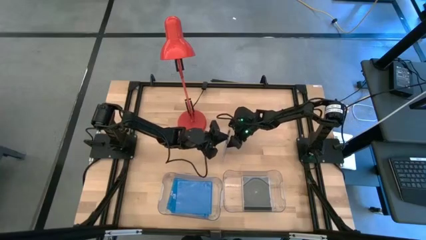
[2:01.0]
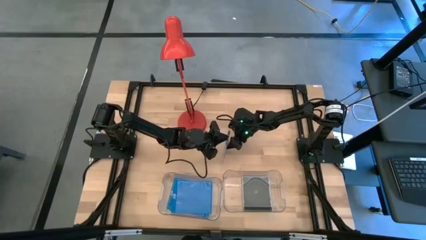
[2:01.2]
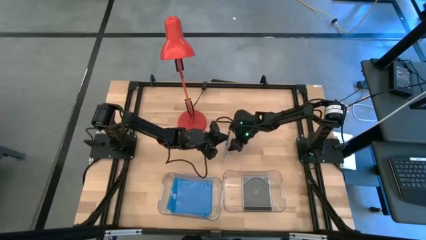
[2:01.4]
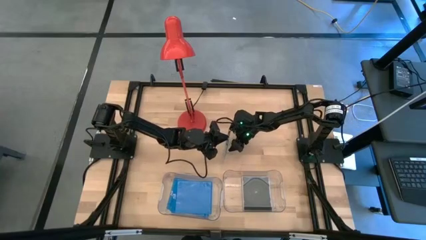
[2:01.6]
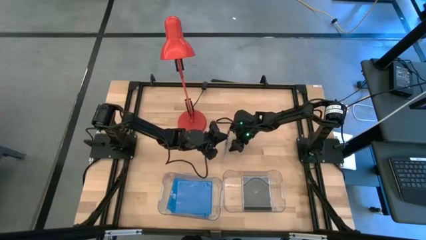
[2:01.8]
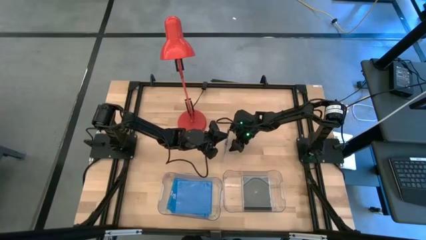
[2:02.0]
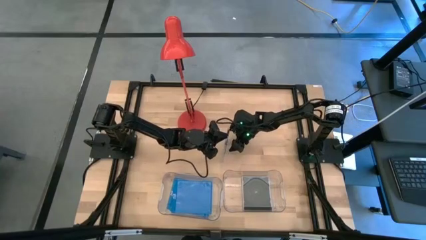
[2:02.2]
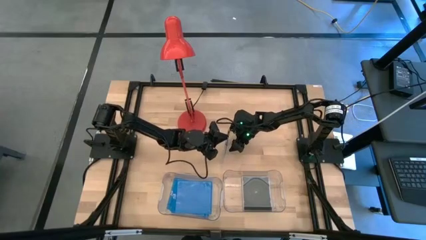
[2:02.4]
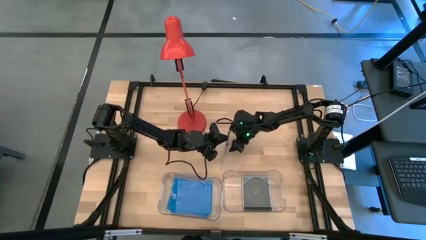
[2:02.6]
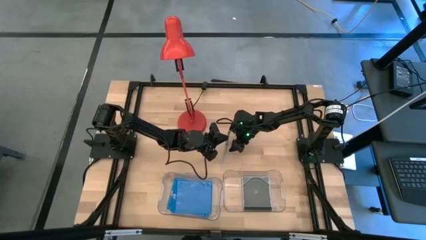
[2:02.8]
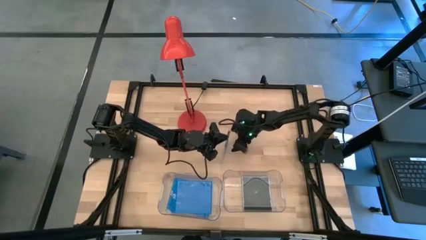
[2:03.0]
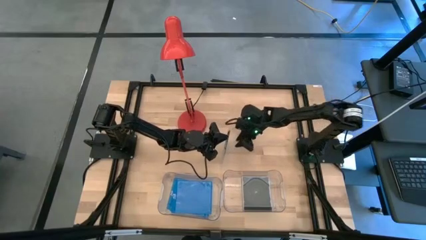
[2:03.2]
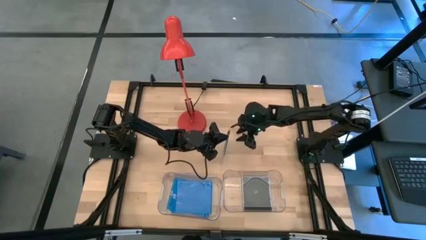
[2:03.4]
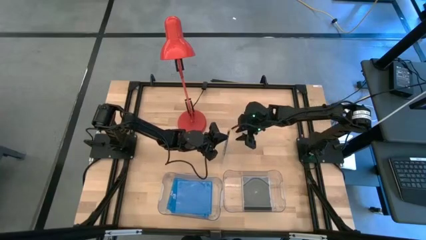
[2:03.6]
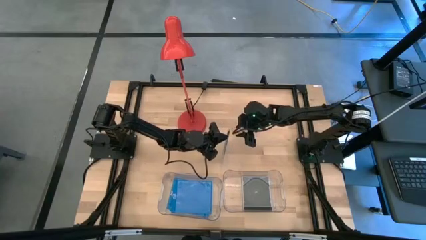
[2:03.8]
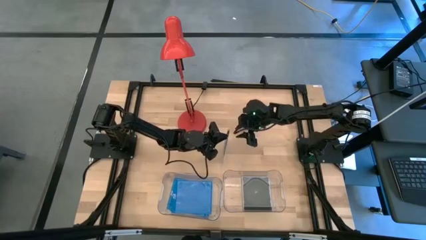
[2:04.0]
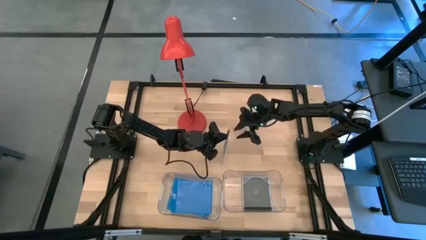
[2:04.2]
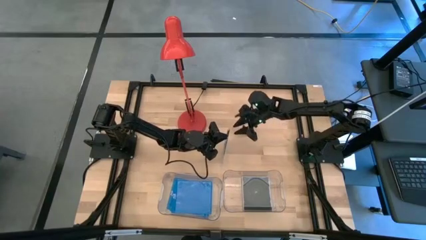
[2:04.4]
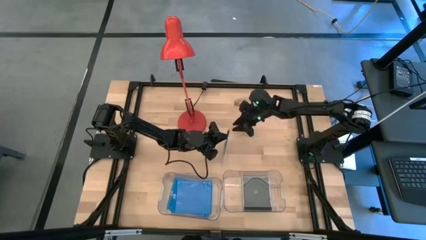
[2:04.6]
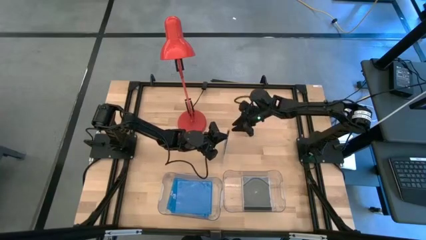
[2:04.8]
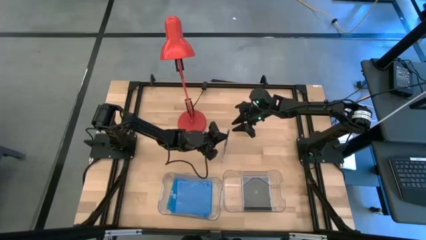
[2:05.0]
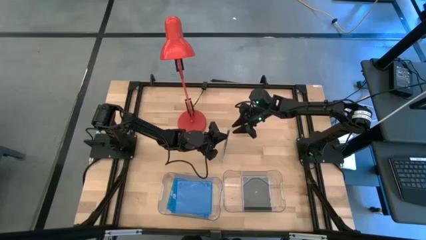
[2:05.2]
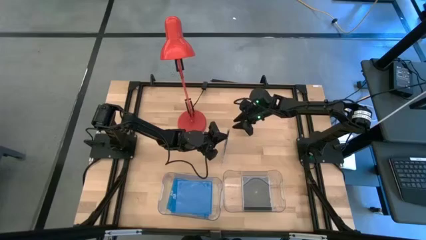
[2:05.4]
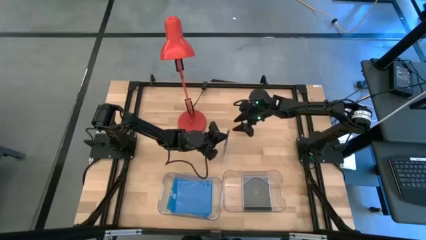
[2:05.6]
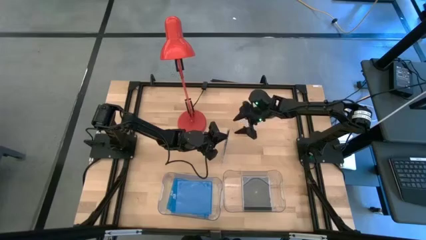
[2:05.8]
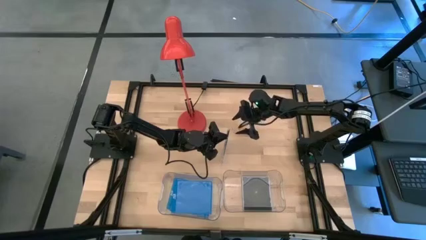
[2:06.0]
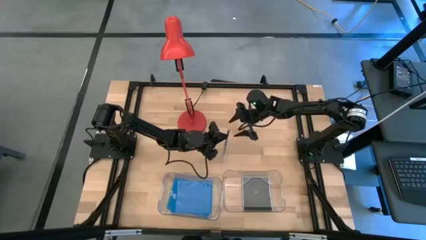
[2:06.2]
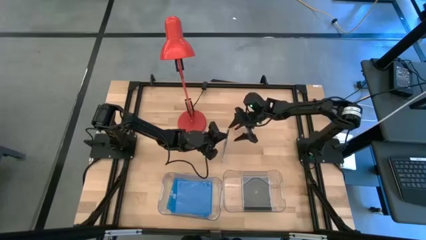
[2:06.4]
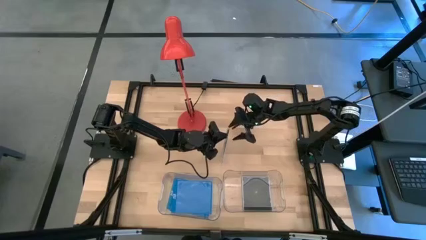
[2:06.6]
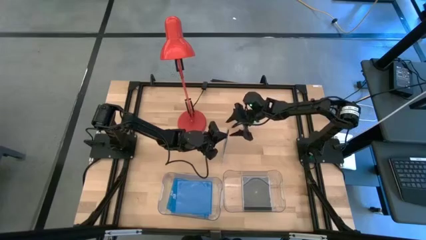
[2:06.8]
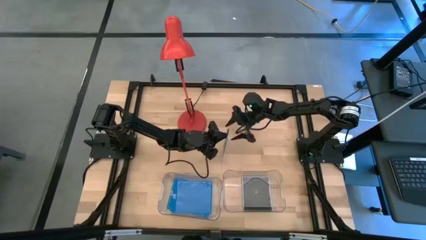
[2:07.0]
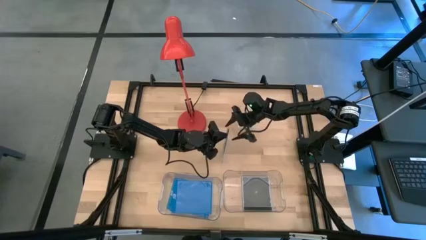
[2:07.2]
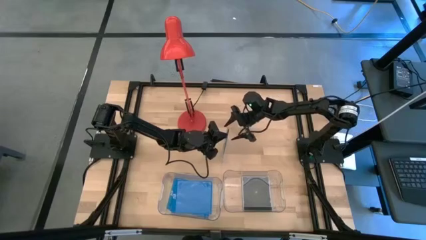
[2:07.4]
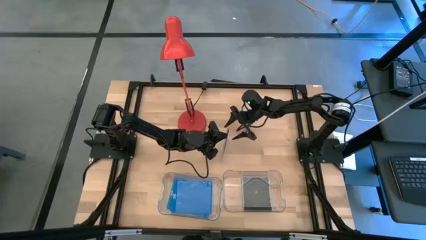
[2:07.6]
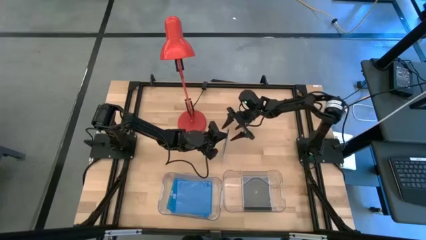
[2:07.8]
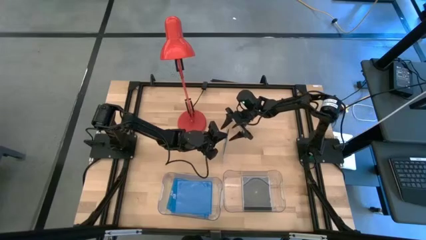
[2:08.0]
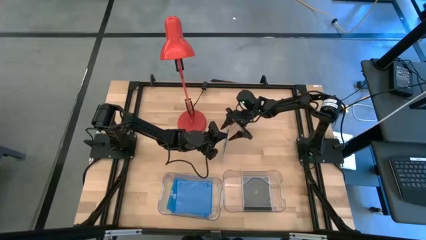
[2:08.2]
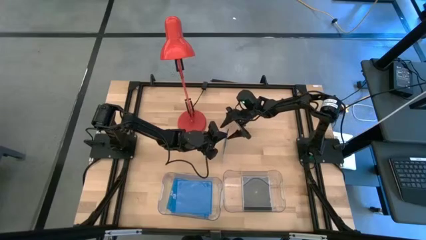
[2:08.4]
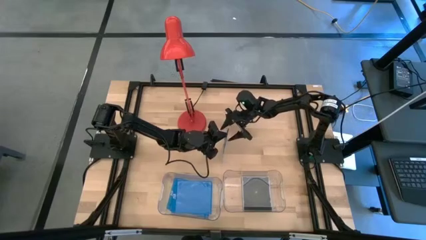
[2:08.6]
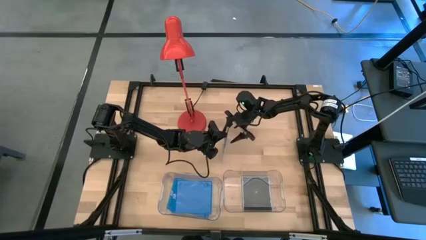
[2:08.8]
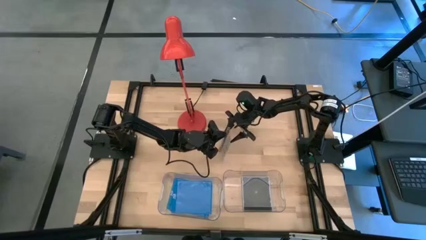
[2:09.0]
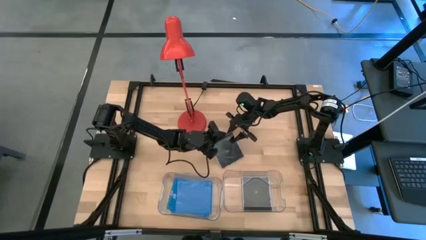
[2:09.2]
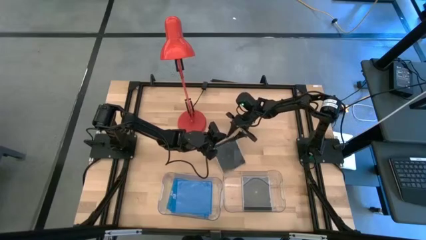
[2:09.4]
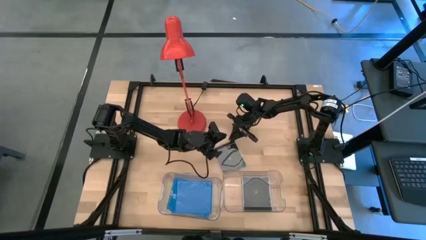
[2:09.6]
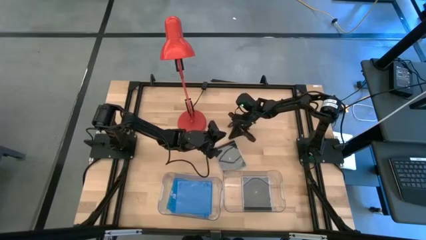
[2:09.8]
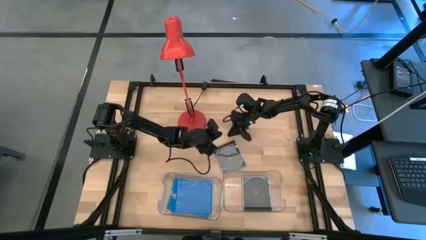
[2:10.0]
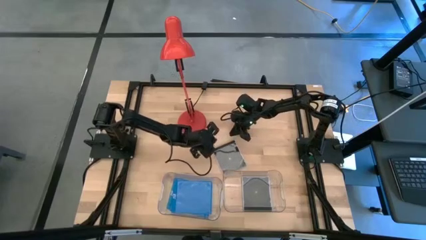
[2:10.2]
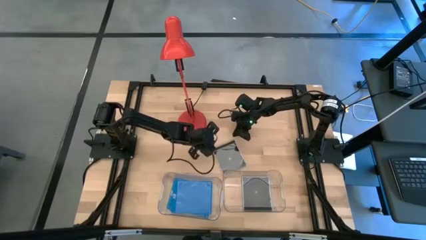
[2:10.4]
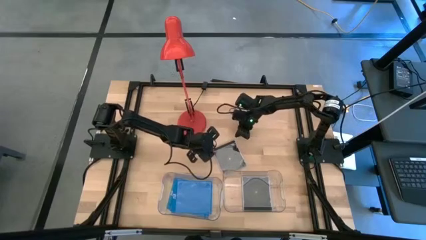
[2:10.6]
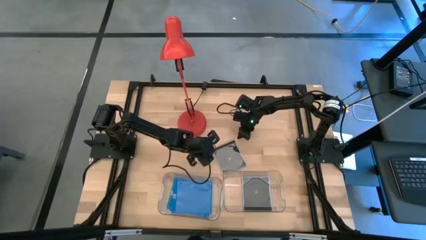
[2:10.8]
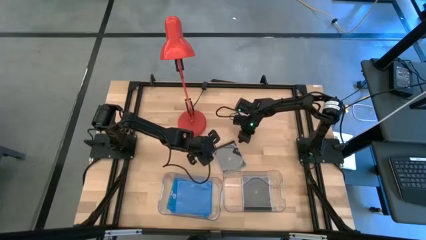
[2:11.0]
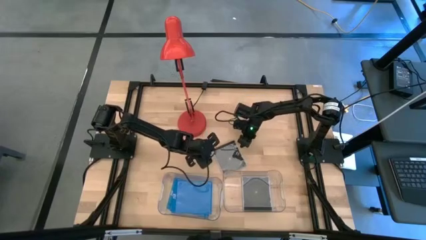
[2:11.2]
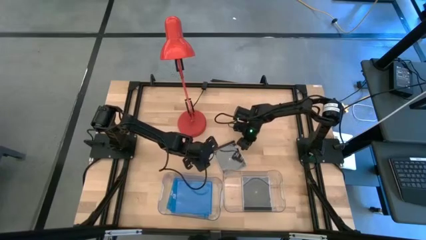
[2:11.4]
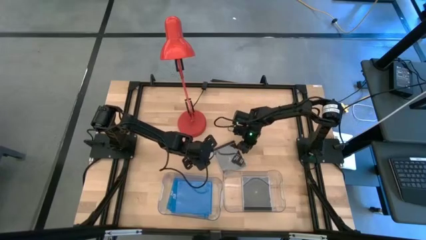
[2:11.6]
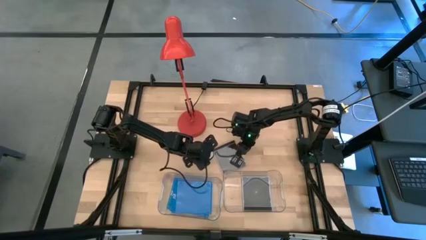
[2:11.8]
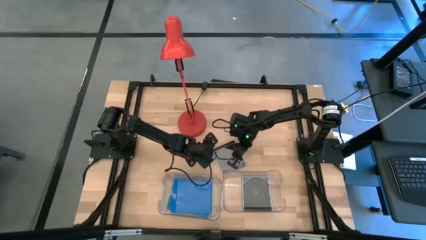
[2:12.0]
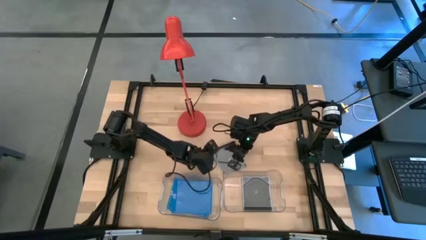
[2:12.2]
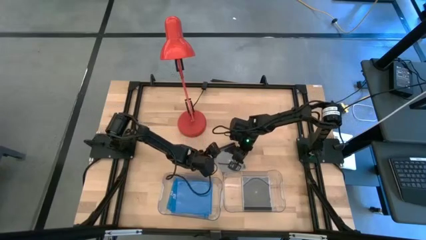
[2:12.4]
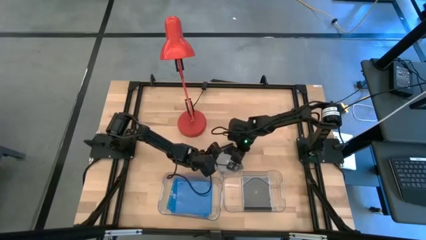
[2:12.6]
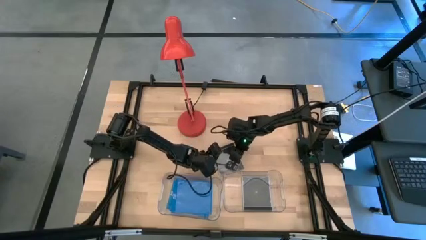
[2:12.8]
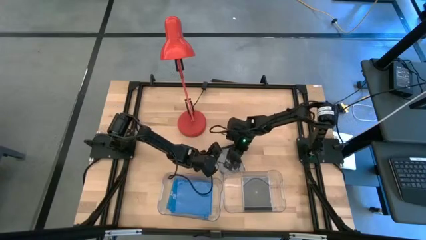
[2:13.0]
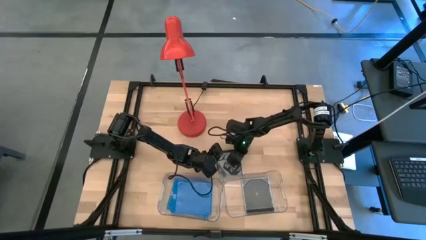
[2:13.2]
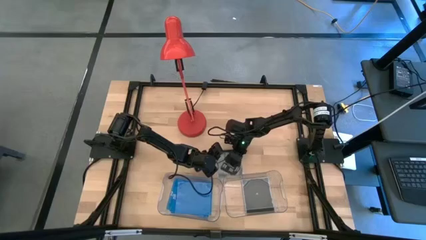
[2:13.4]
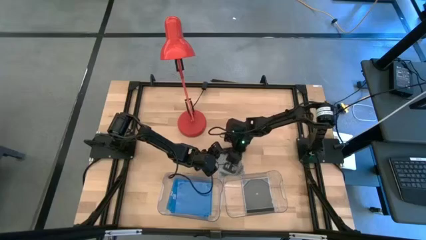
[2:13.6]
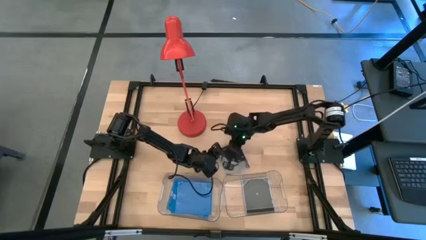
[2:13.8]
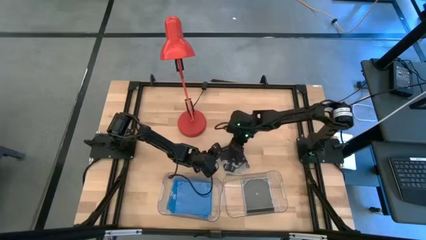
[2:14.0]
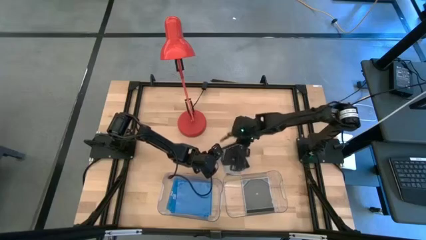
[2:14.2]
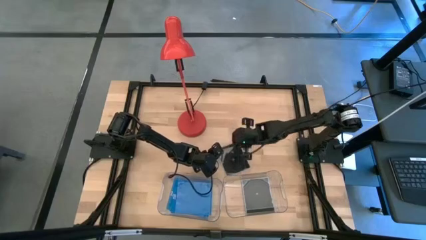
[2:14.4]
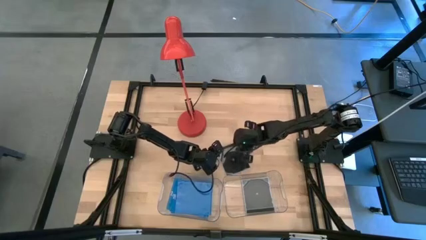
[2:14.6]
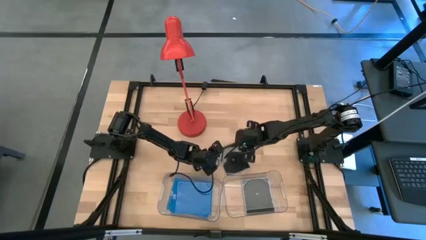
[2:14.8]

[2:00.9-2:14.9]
Task: Pick & place jewel cases by type
Put the black cd case into the right transparent bin
